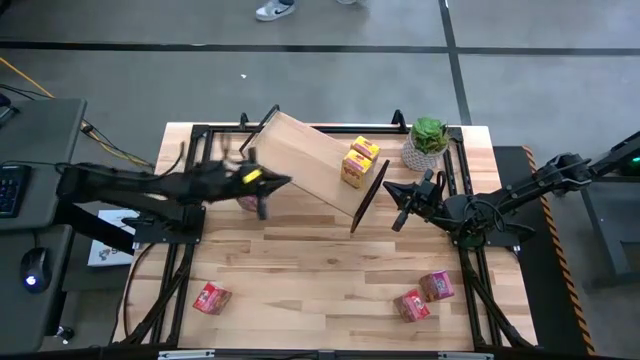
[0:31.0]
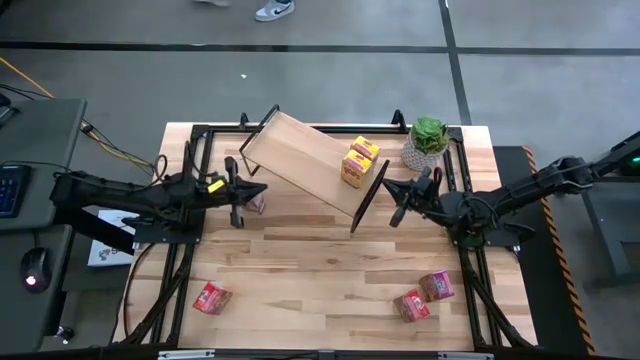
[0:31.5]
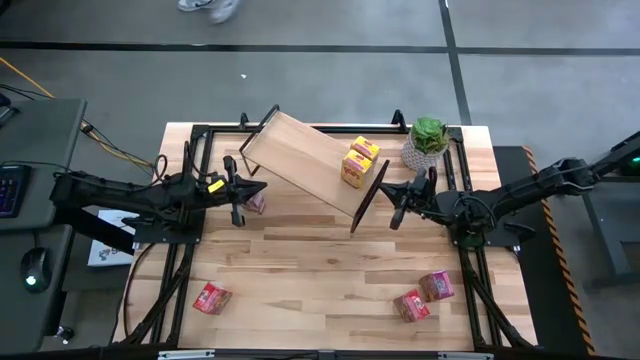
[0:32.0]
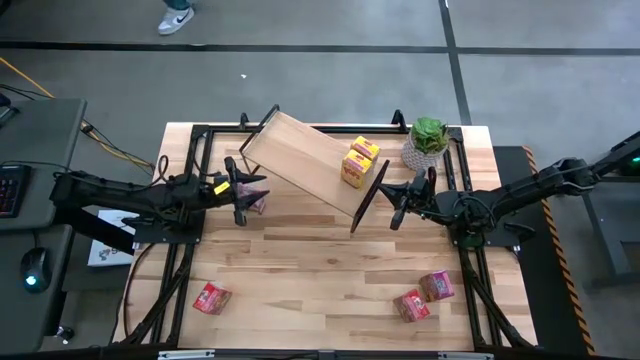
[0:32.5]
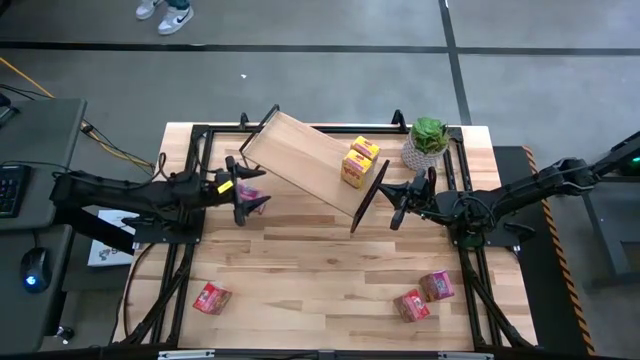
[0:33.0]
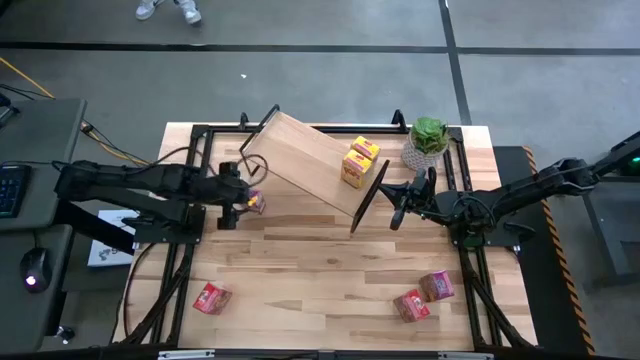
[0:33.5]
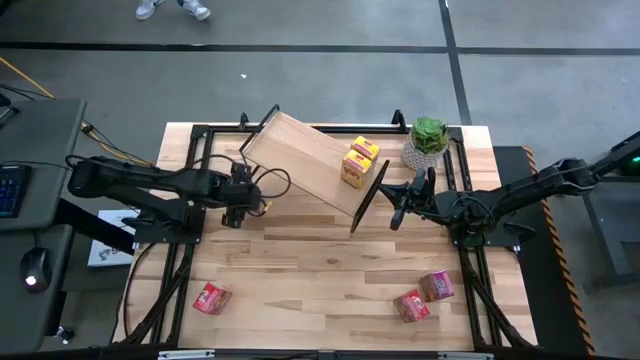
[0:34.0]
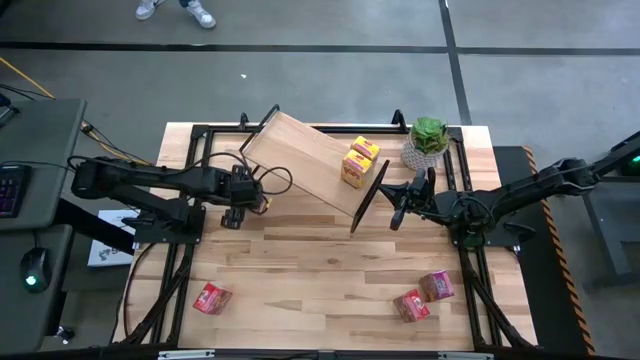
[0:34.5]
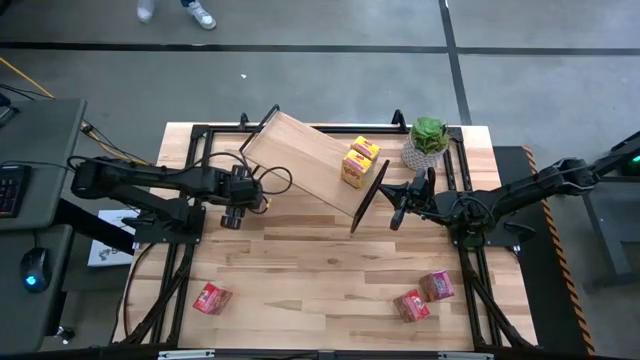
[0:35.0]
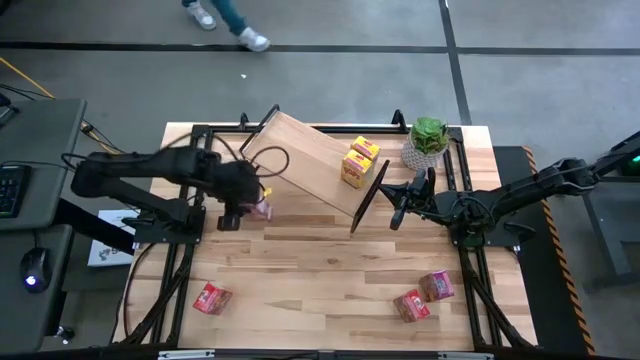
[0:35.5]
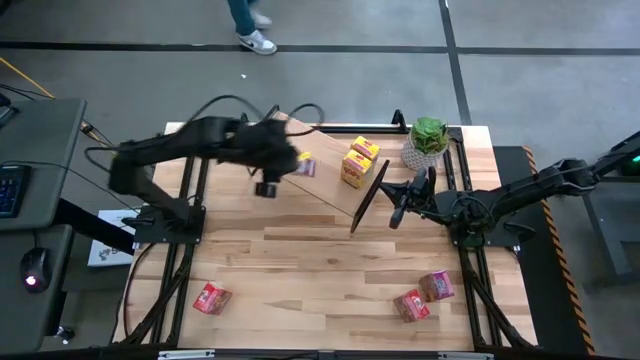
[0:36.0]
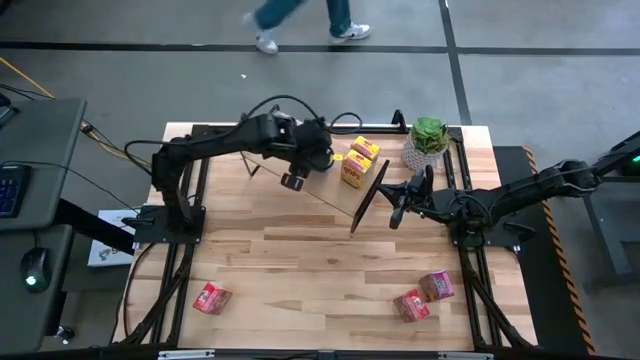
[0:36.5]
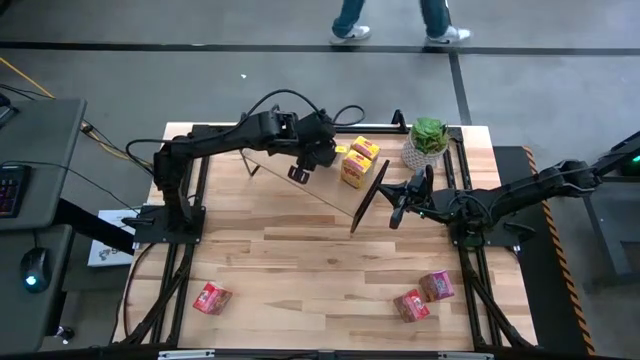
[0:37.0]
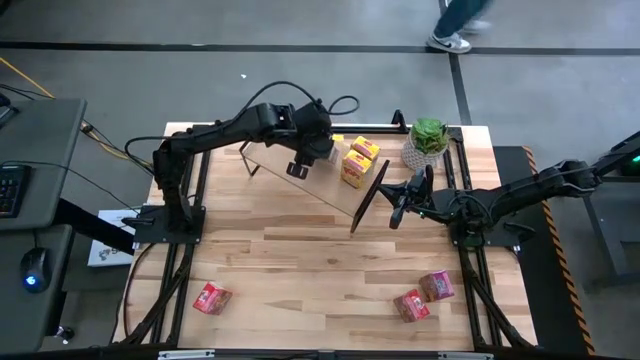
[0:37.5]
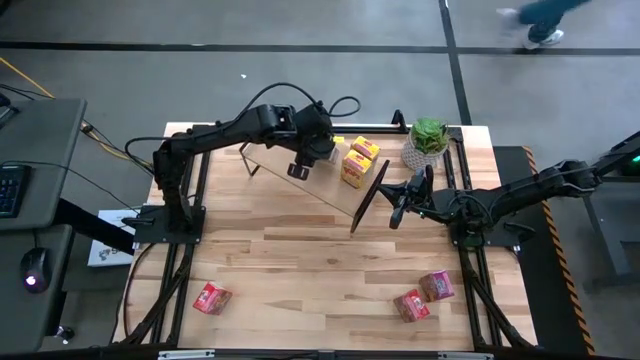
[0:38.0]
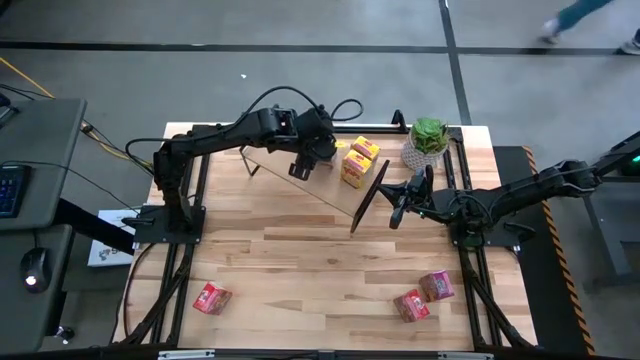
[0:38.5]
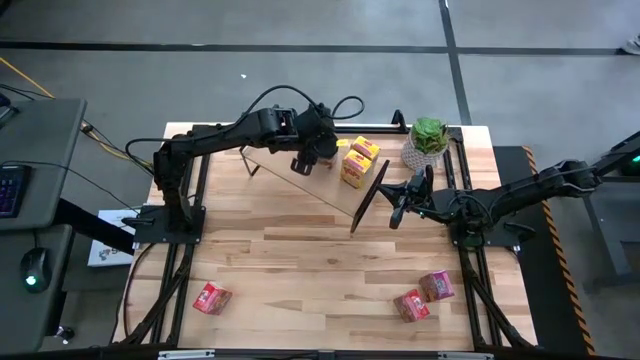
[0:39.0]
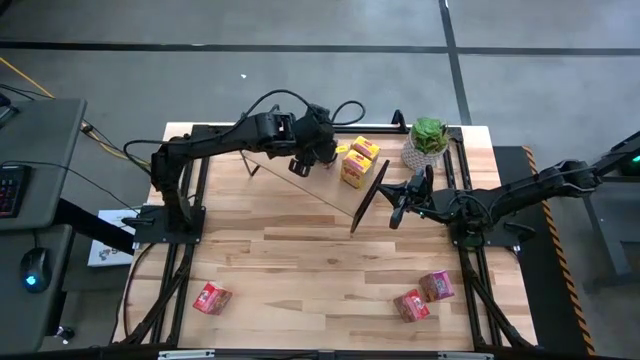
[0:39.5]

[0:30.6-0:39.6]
Task: Stack cereal on shelf
Put the top left purple cereal box on the shelf

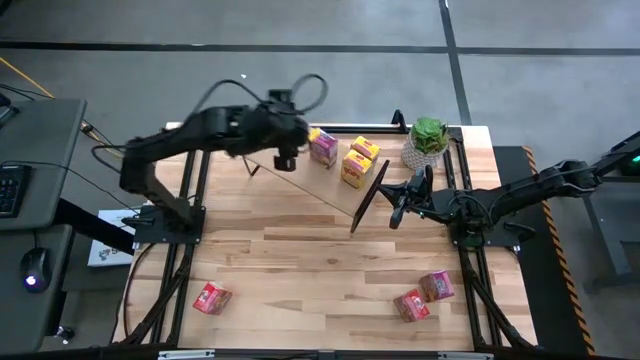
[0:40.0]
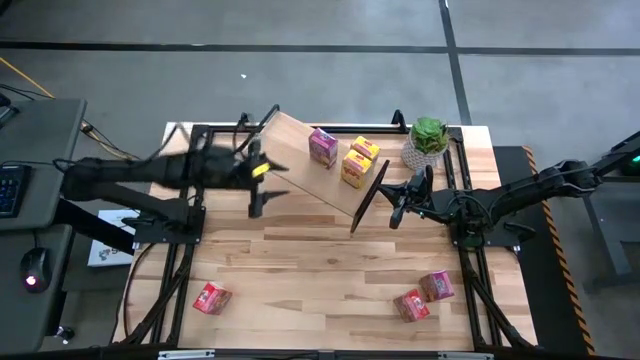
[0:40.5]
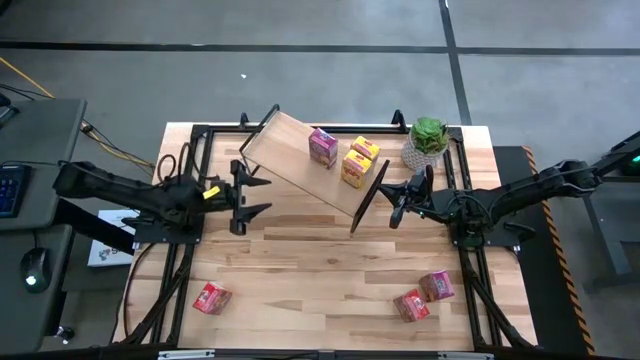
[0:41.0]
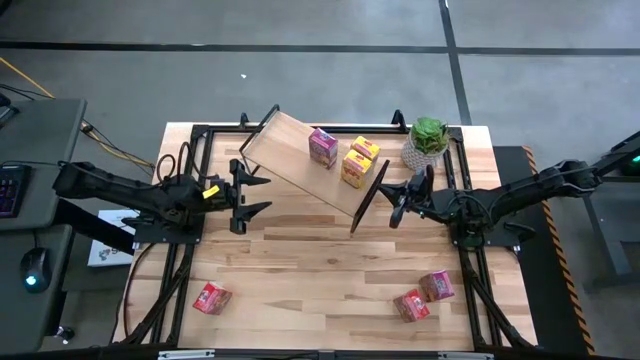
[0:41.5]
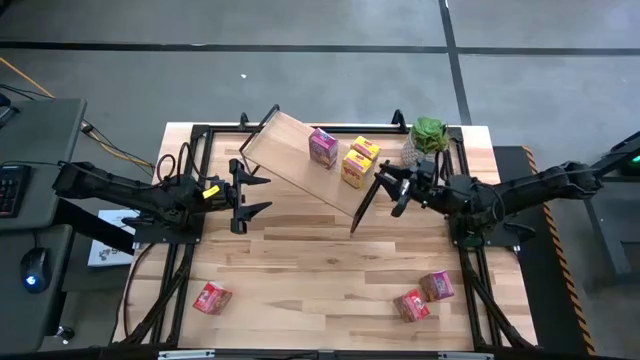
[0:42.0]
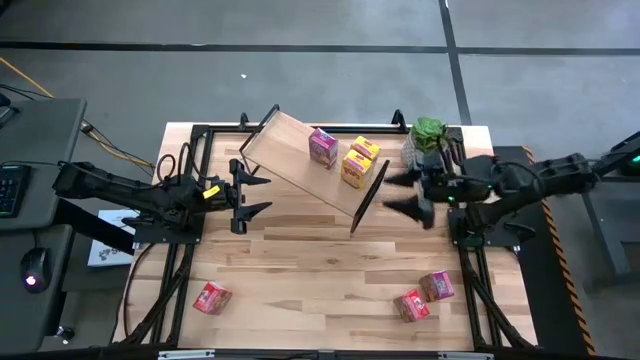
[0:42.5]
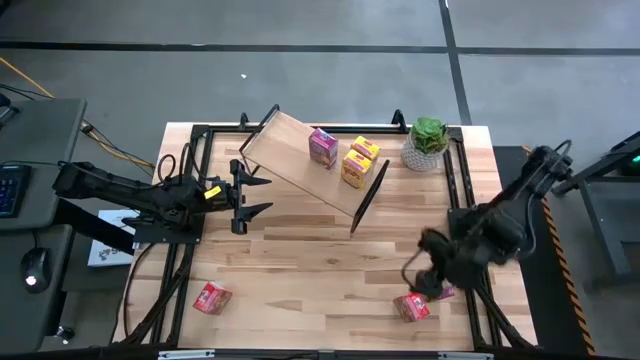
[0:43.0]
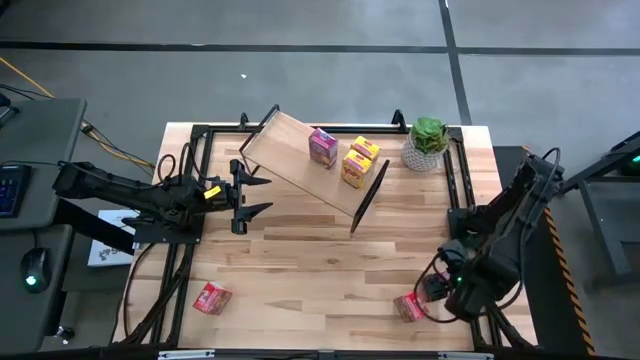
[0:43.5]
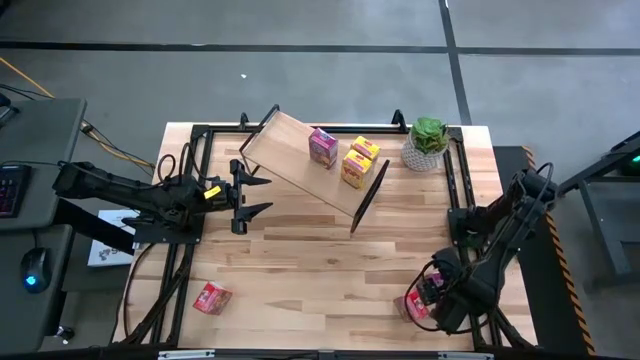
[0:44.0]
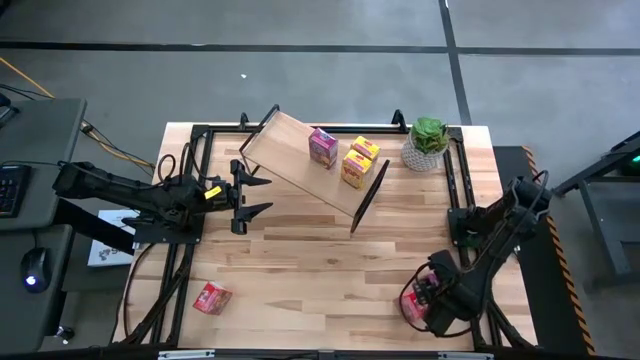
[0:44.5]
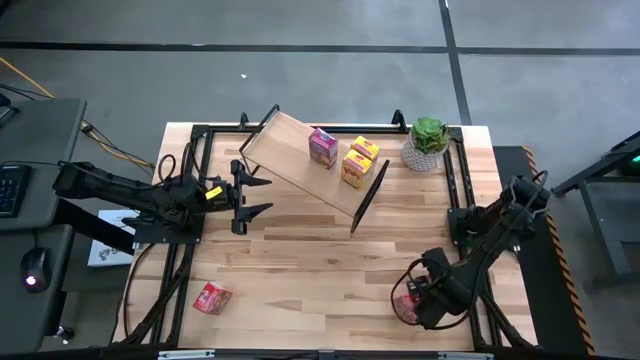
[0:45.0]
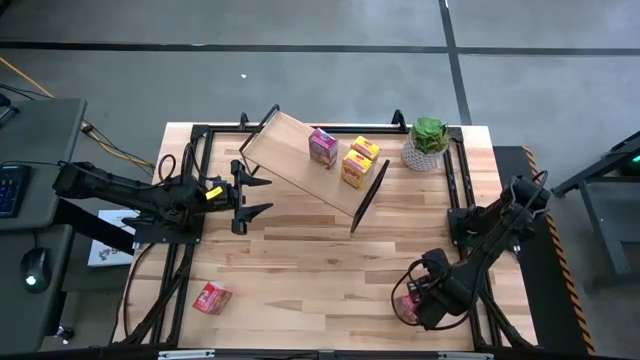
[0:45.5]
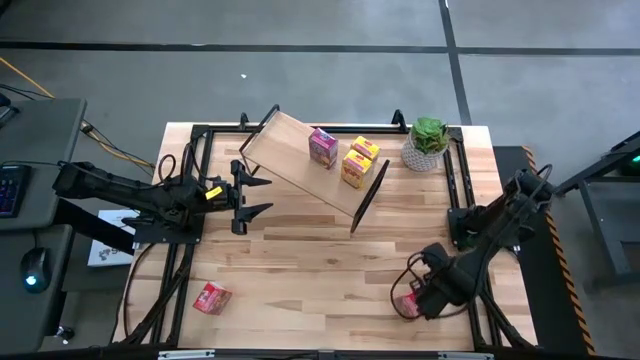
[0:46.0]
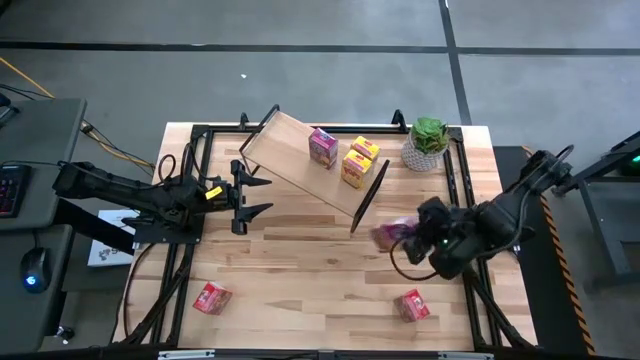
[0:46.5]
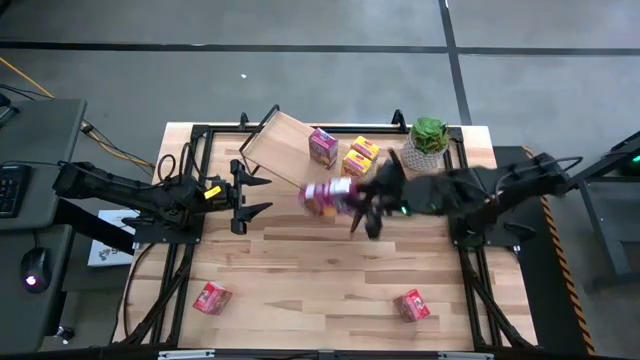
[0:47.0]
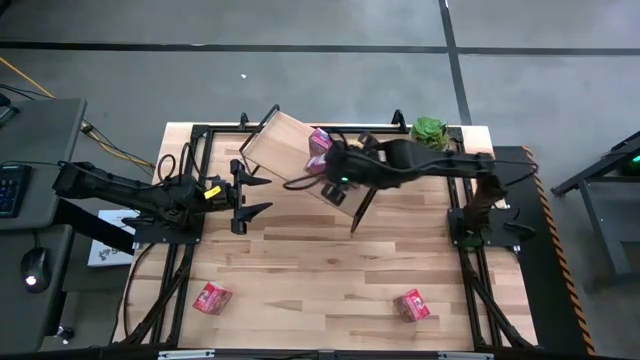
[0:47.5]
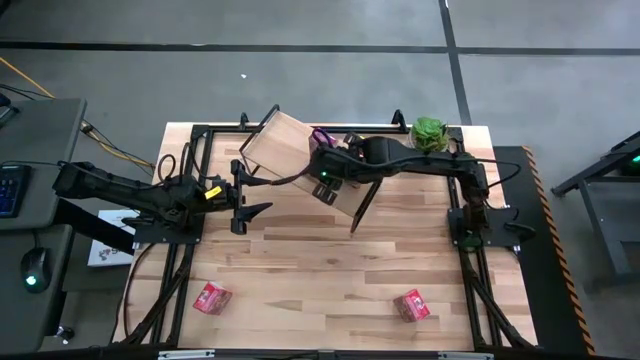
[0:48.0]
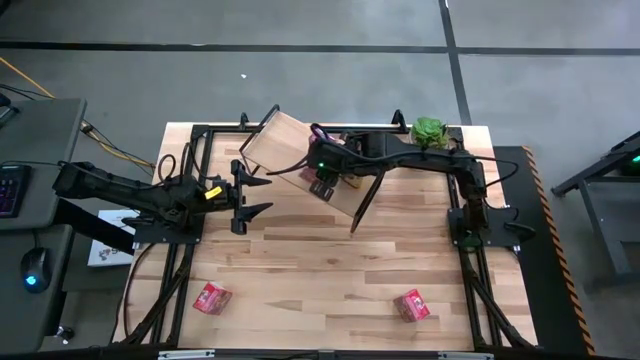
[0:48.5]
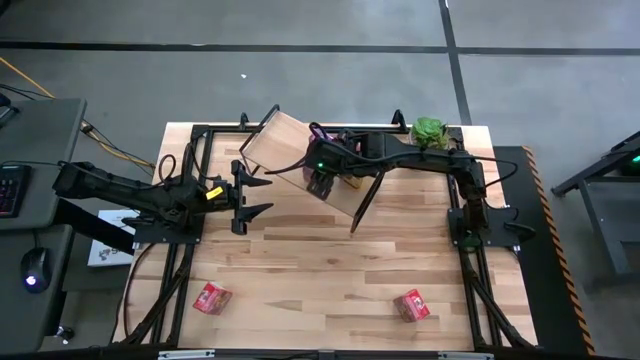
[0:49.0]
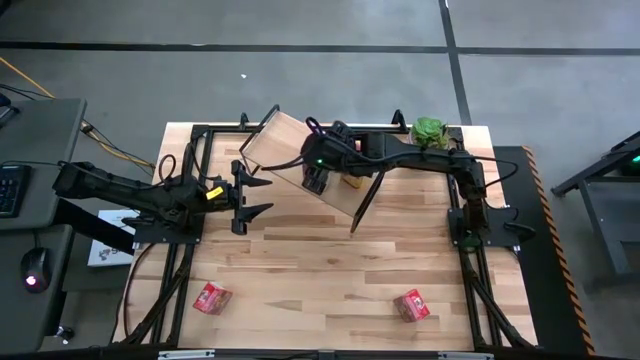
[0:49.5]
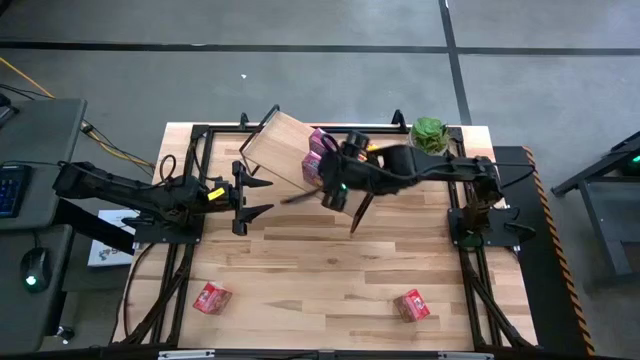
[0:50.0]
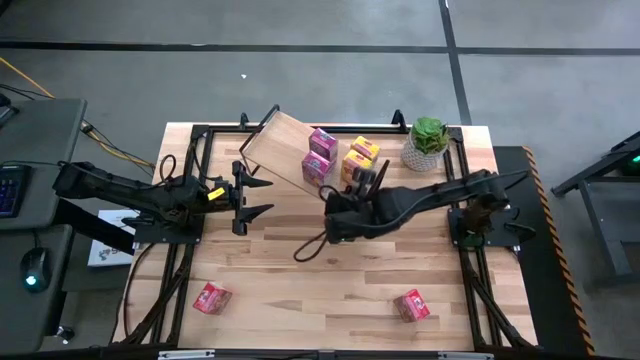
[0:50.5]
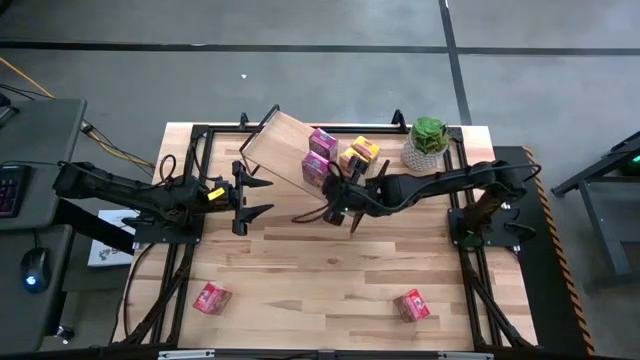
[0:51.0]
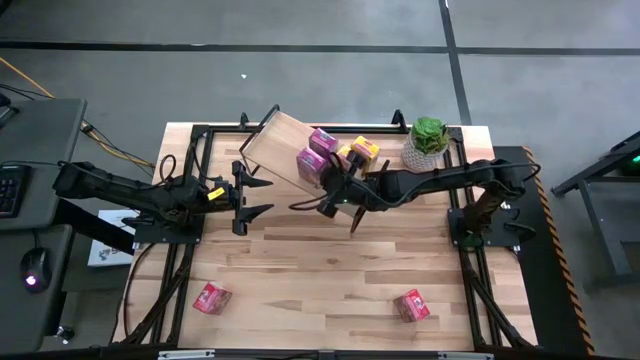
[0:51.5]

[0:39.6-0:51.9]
Put the purple cereal box aligned with the other purple cereal box on the shelf
